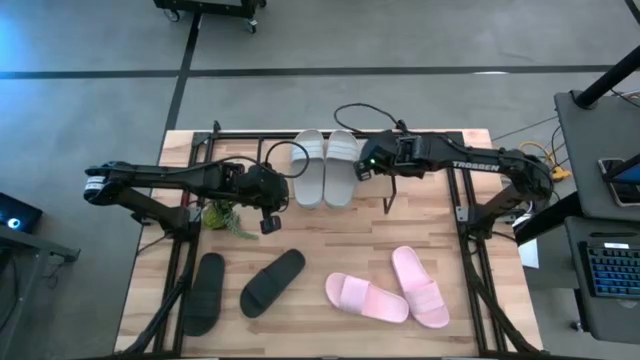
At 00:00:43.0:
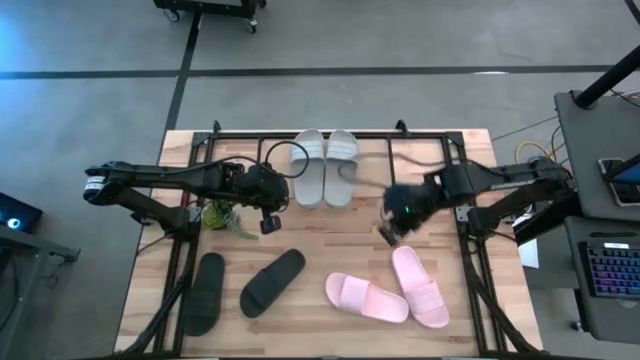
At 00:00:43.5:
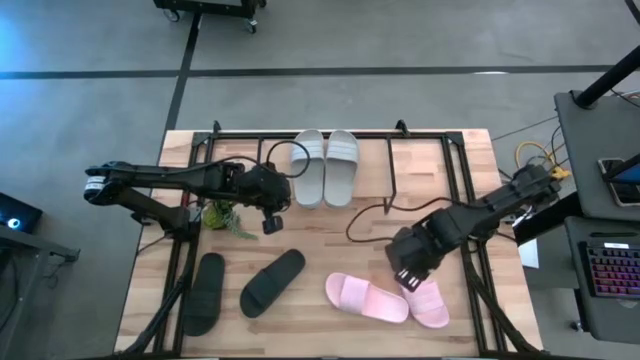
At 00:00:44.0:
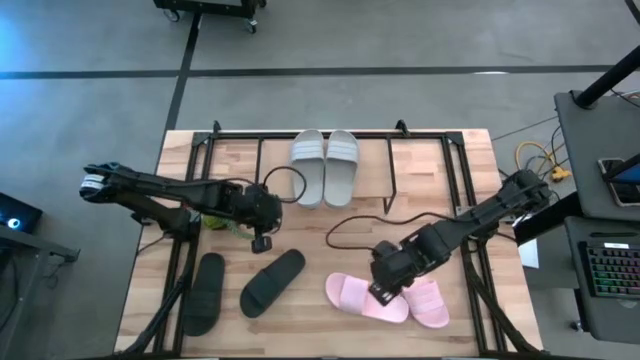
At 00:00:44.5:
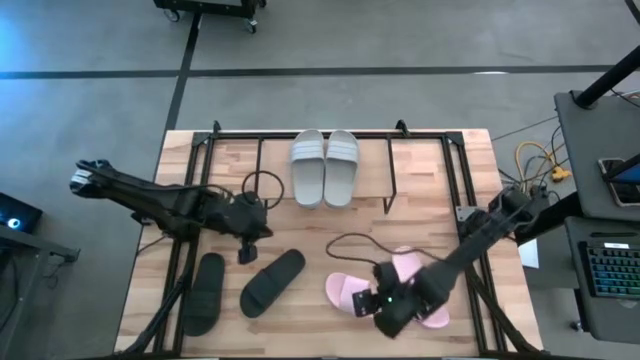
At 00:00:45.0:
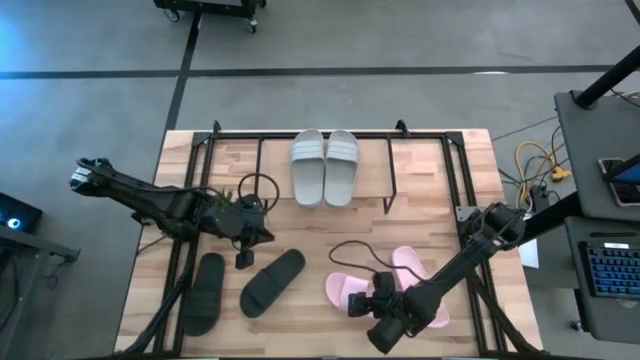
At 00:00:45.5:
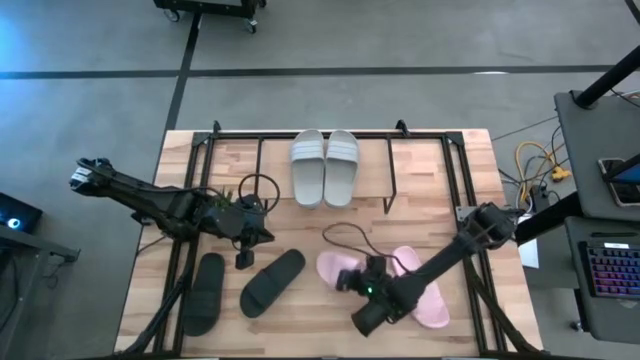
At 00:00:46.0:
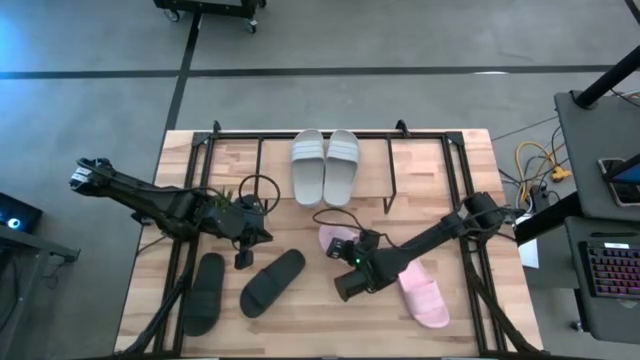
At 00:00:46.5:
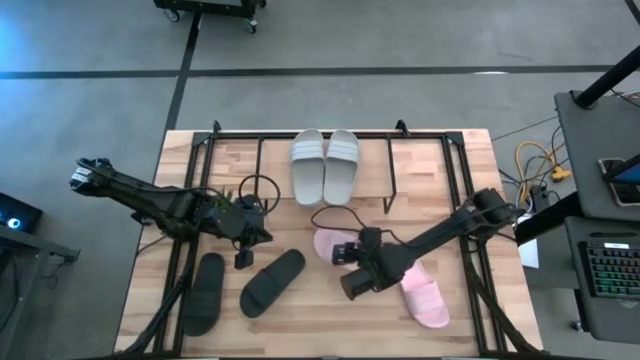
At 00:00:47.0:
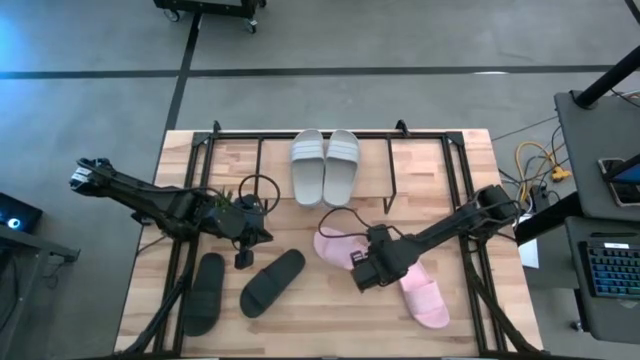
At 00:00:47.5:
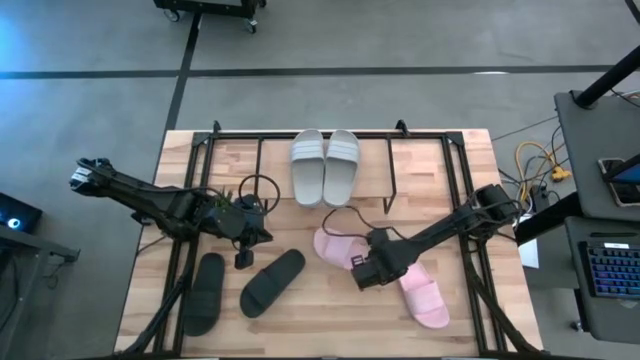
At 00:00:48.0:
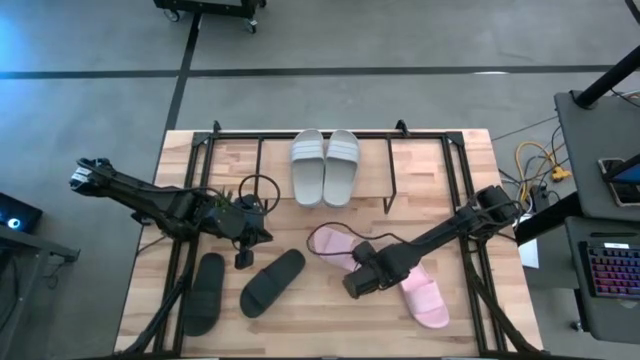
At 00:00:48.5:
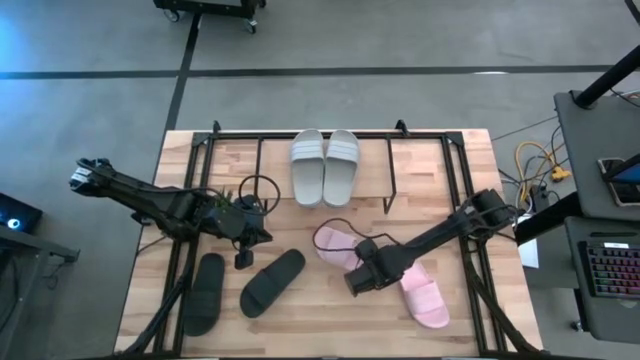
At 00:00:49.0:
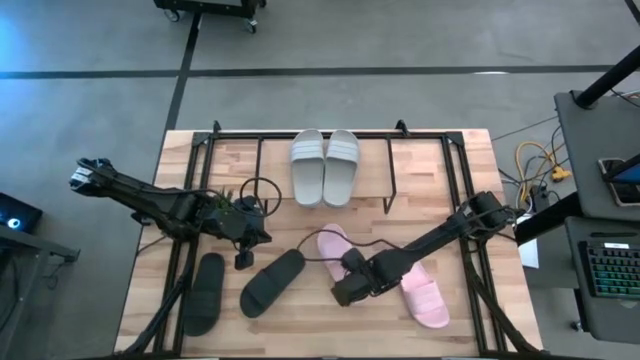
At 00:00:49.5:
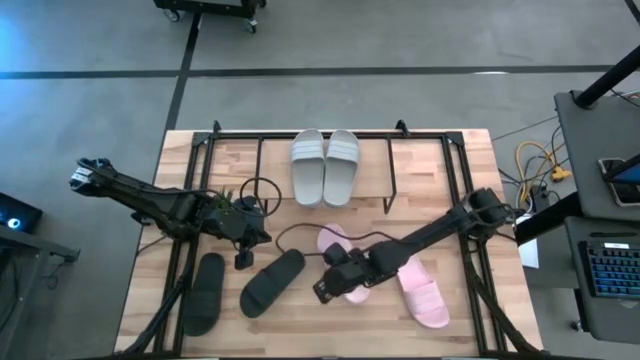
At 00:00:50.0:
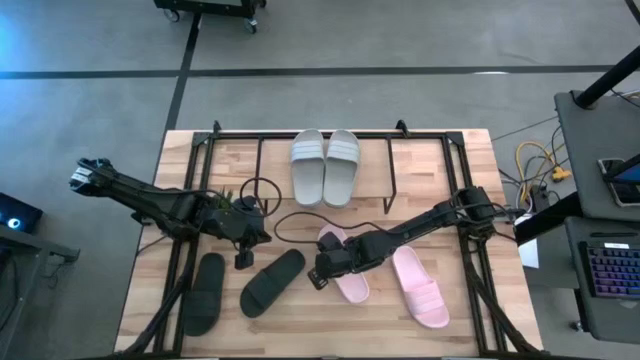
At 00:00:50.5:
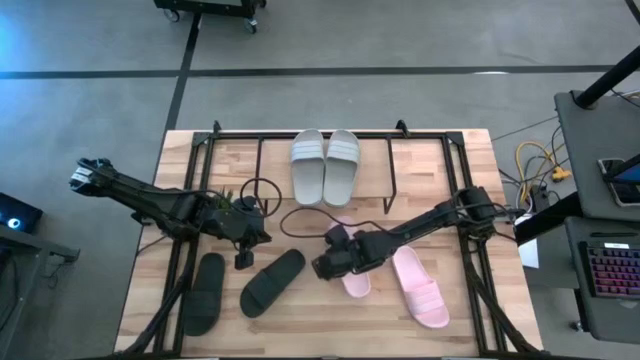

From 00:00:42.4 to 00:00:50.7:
Task: Pick and place slides into the shelf
Adjust the left pink slide

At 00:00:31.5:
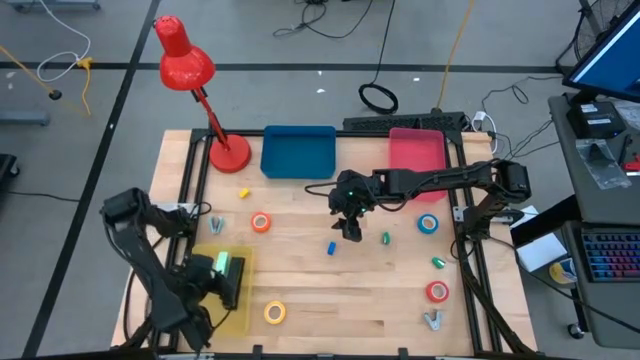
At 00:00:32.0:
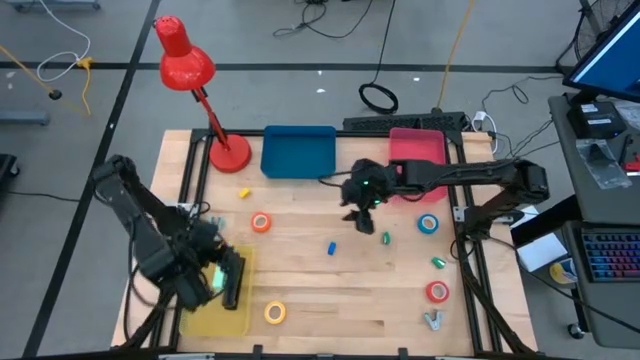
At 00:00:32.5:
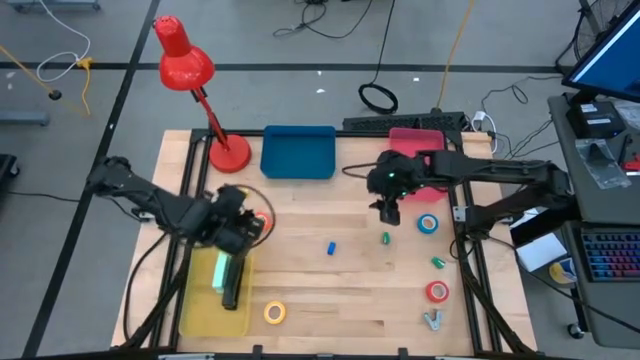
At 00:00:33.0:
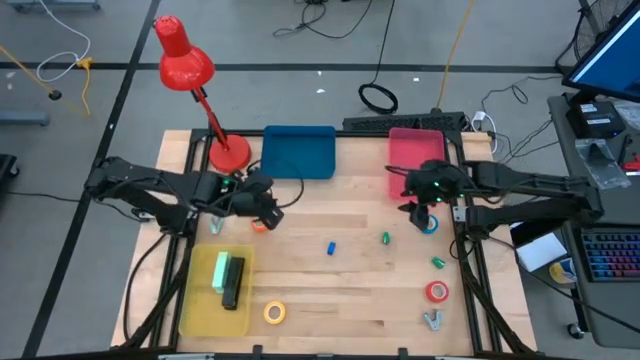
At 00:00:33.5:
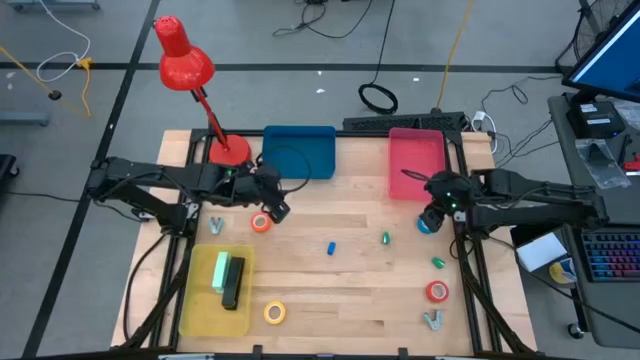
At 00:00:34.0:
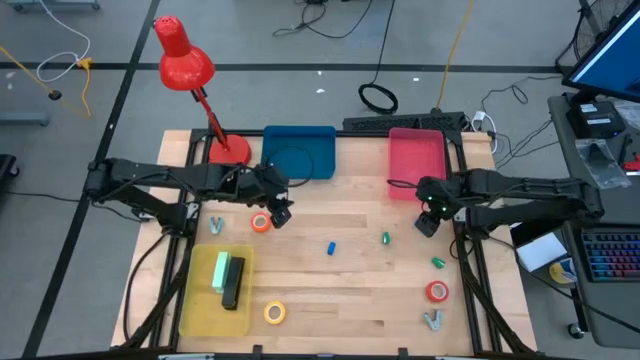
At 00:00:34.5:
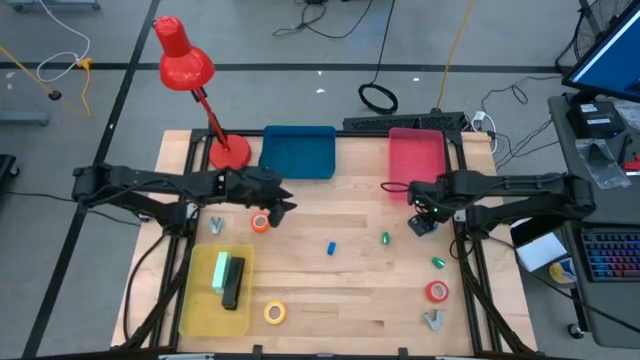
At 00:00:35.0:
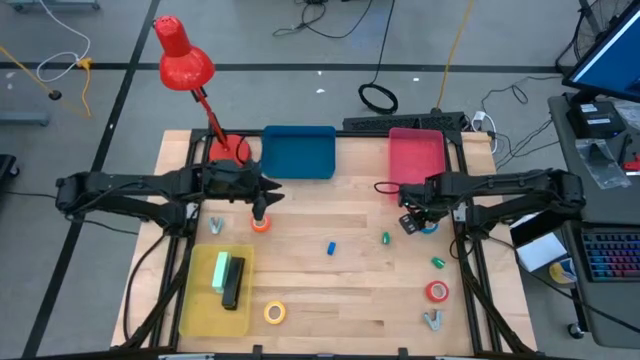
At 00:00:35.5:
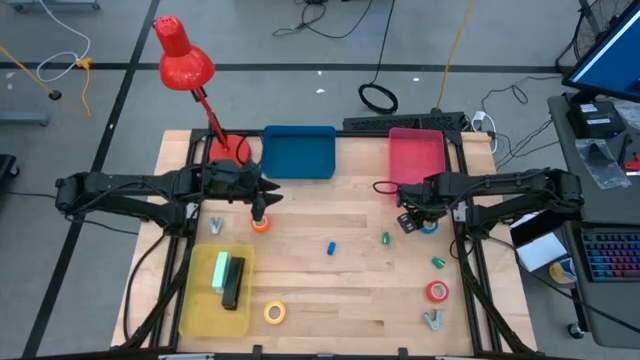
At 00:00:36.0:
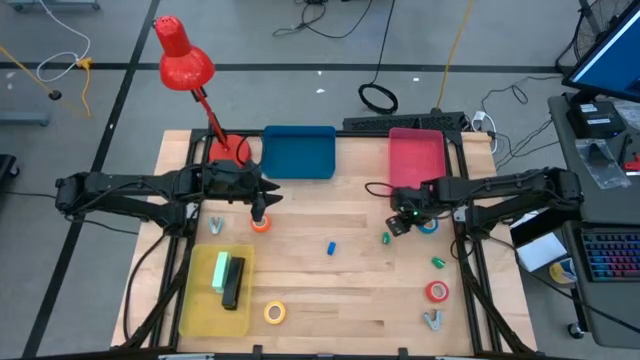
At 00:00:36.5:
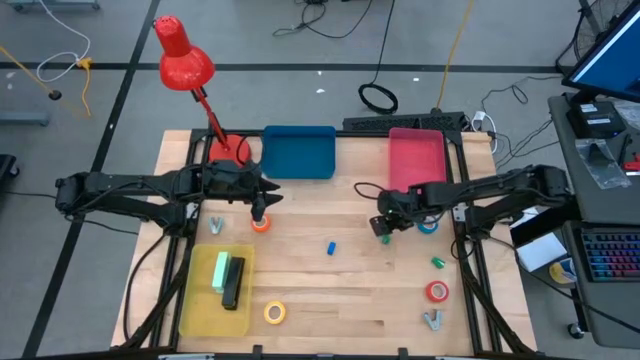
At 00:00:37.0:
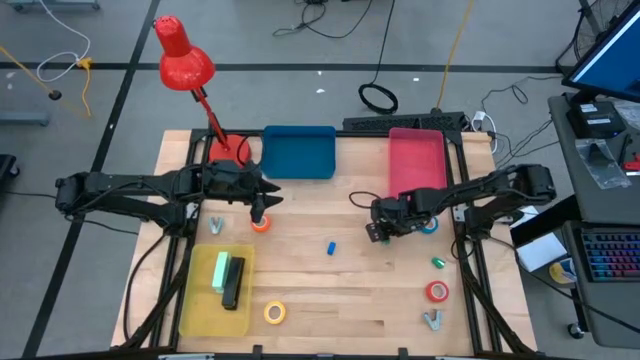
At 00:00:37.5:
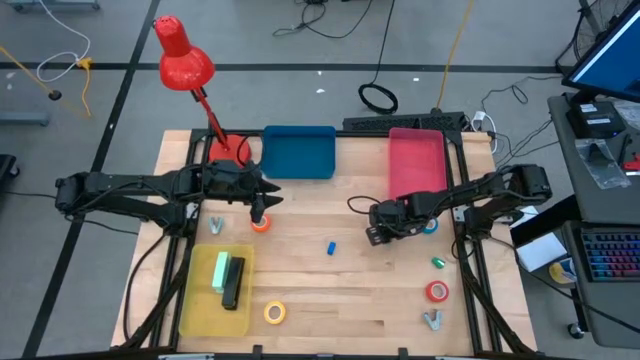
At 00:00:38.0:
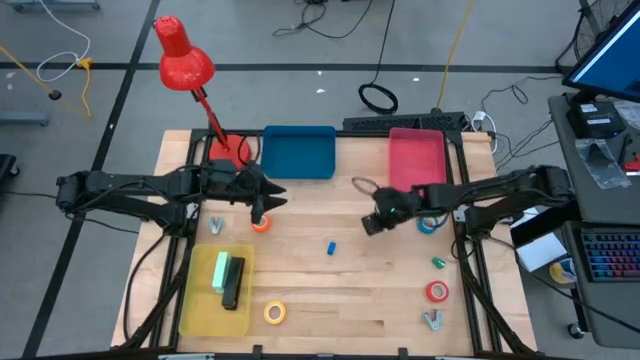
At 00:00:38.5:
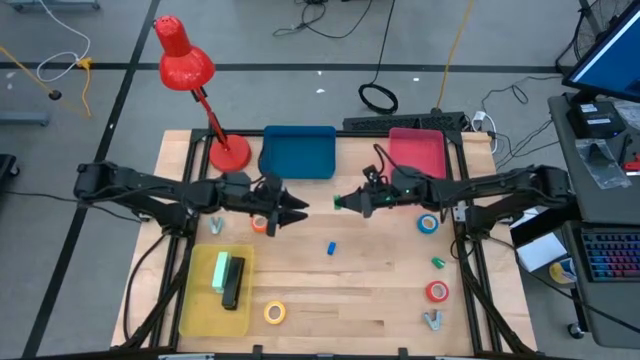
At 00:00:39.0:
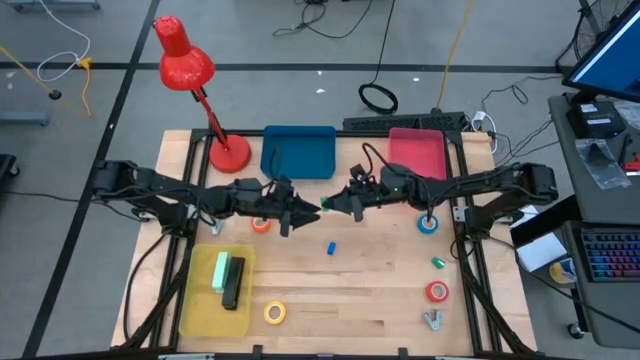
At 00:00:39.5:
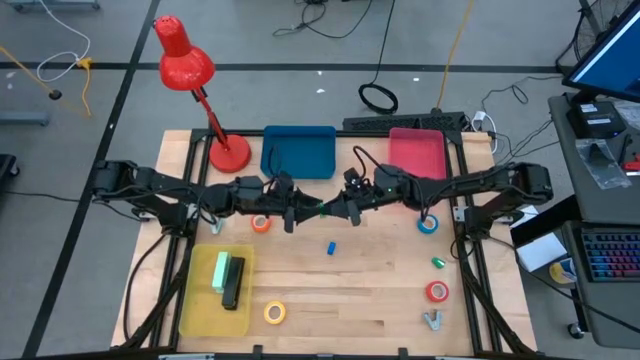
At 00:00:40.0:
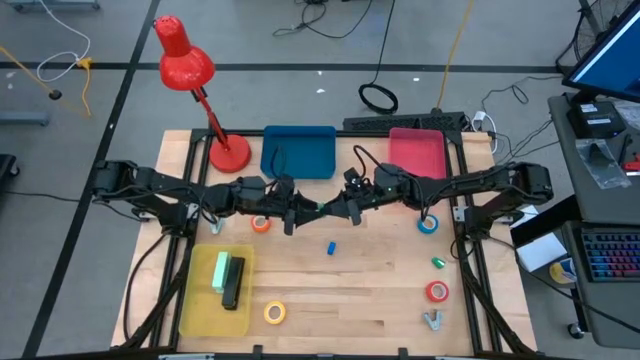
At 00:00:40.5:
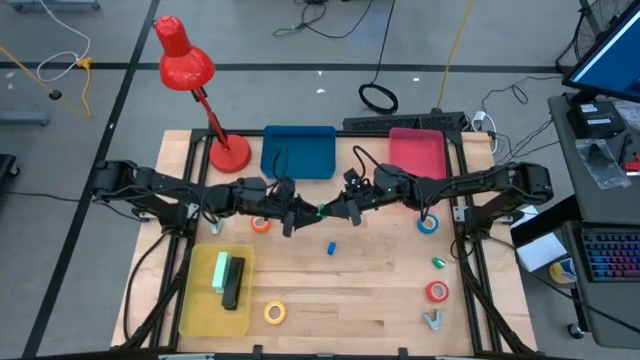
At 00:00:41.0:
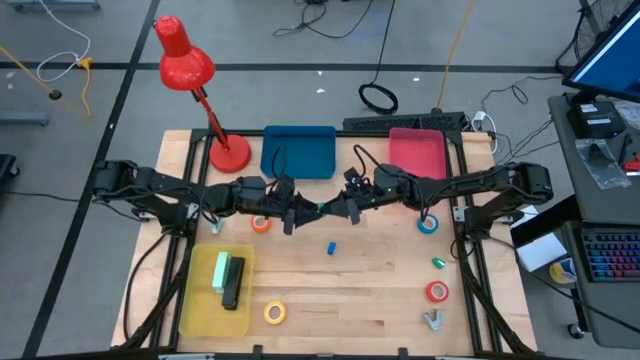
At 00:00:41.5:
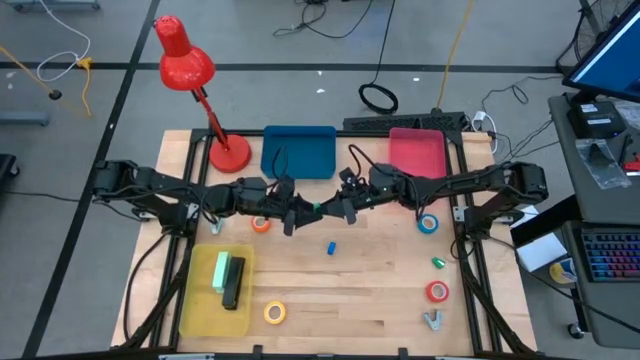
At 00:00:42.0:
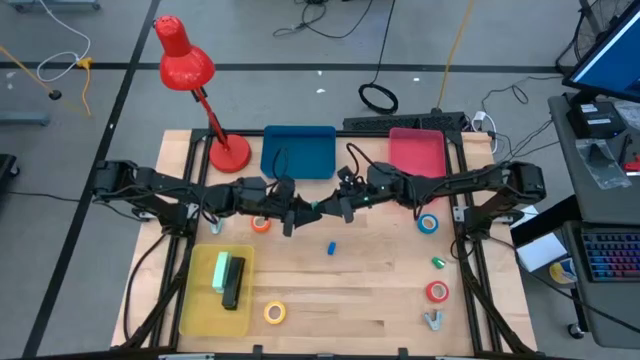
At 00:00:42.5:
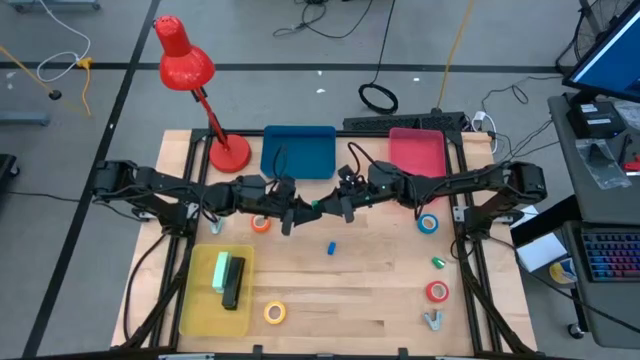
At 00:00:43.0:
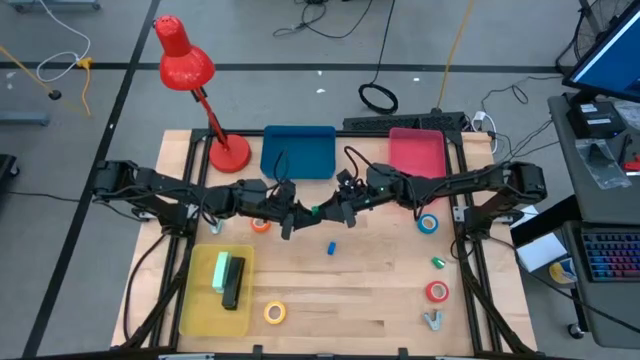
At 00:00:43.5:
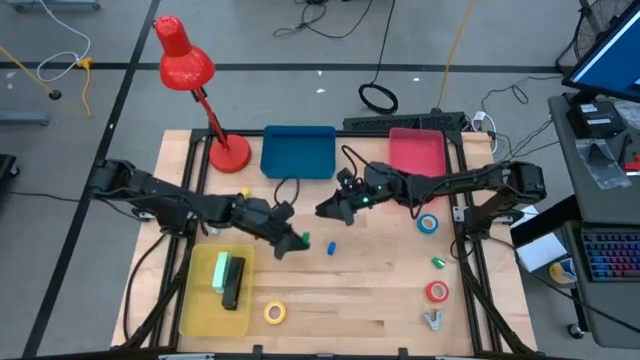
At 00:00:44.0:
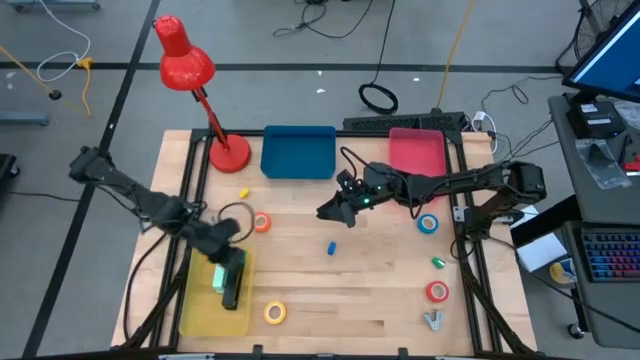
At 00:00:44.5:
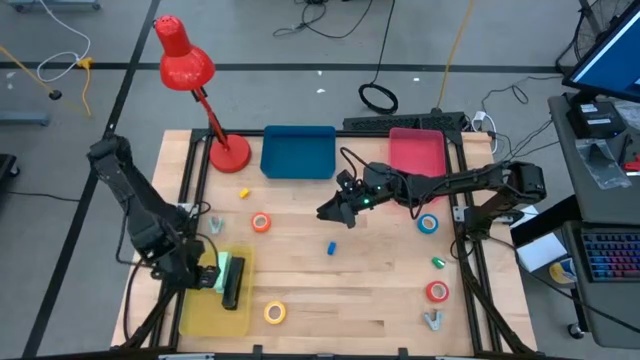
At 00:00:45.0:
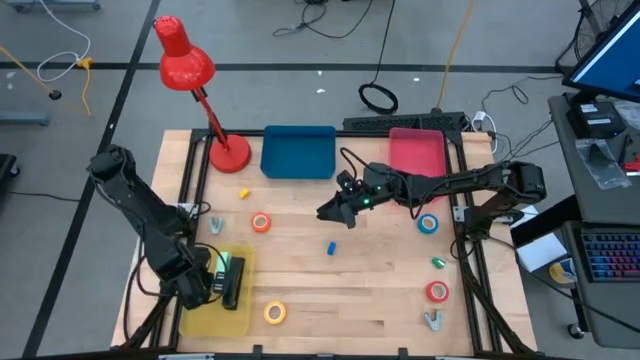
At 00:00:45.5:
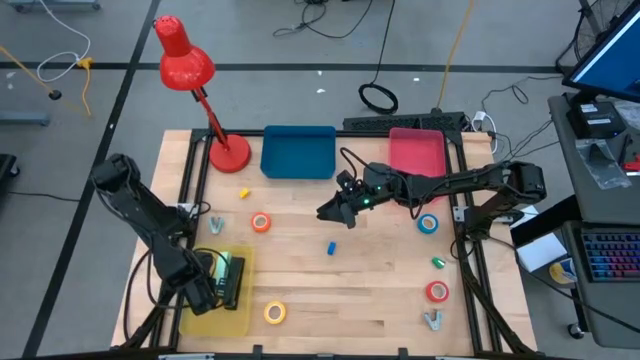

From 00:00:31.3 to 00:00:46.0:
Task: Pick and place Stapler, Stapler remover, tape
Put the green stapler into the yellow bin
